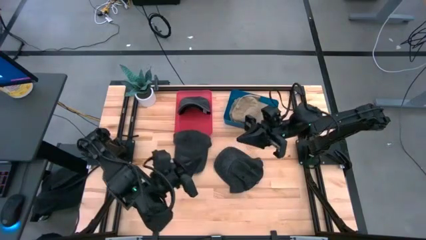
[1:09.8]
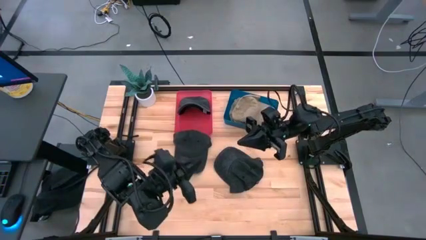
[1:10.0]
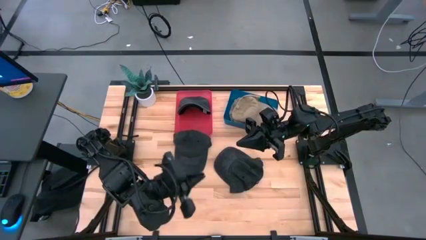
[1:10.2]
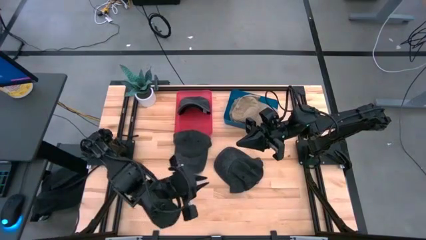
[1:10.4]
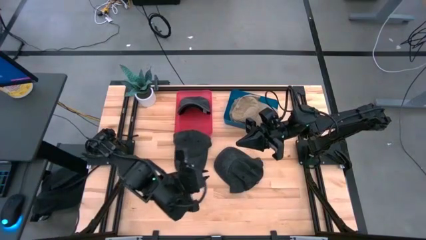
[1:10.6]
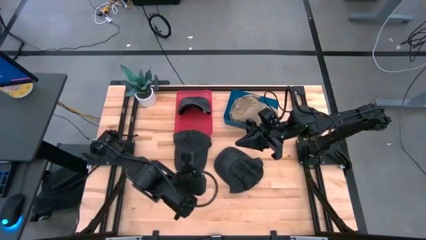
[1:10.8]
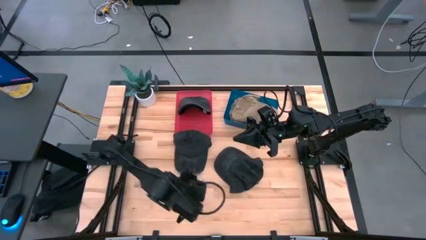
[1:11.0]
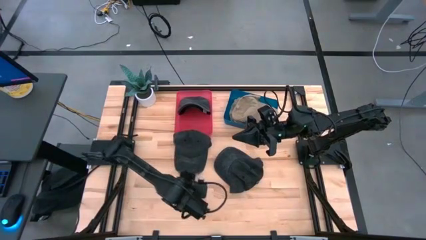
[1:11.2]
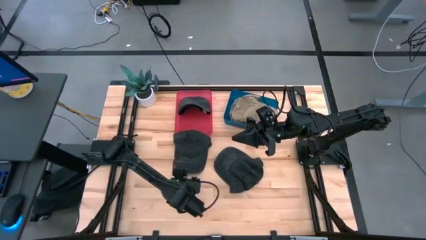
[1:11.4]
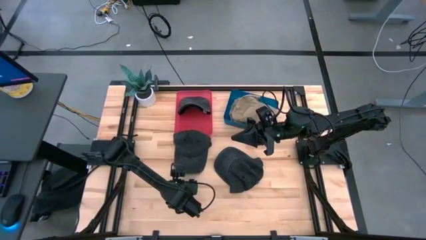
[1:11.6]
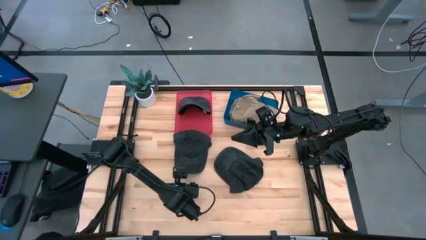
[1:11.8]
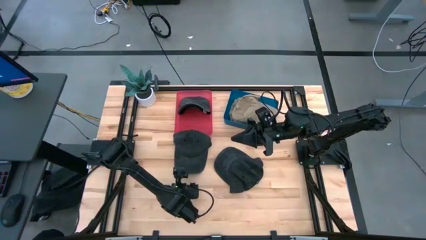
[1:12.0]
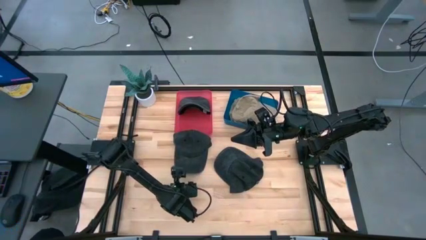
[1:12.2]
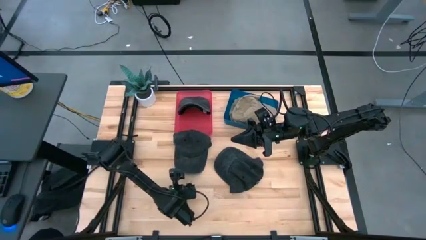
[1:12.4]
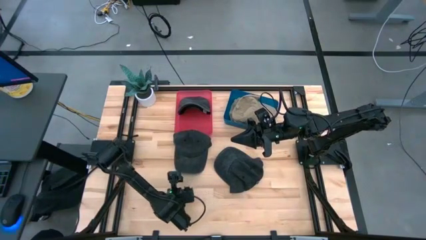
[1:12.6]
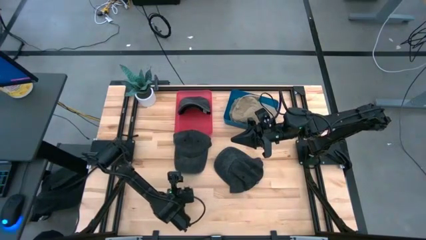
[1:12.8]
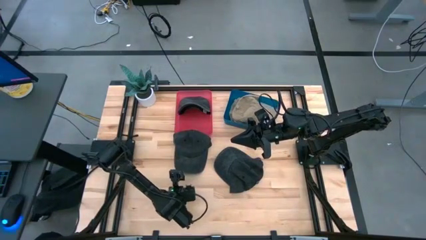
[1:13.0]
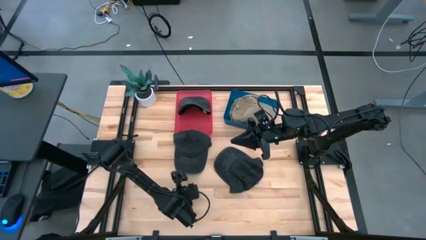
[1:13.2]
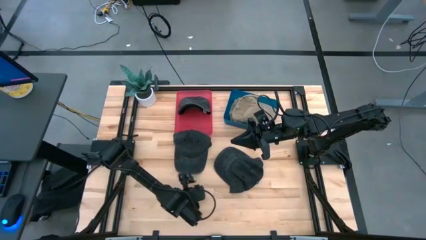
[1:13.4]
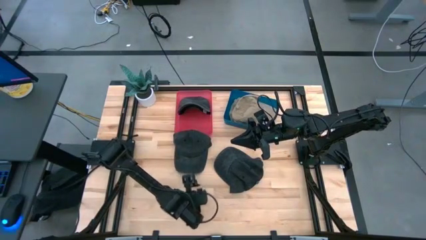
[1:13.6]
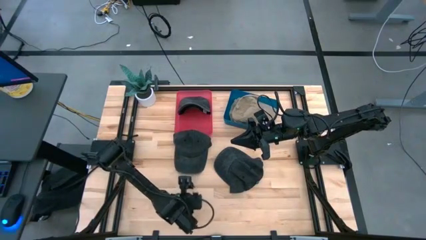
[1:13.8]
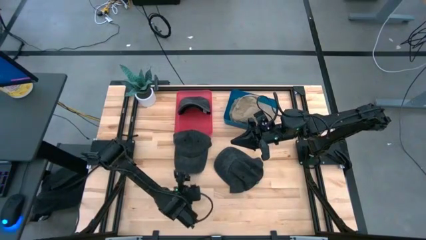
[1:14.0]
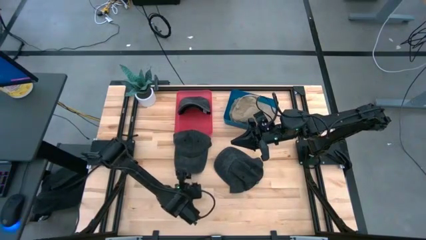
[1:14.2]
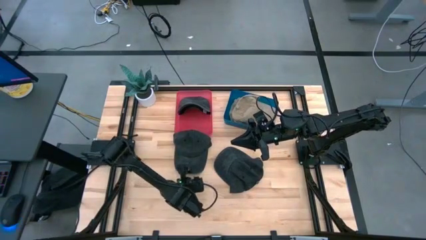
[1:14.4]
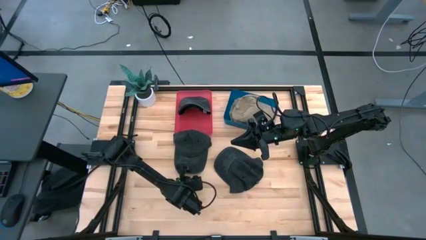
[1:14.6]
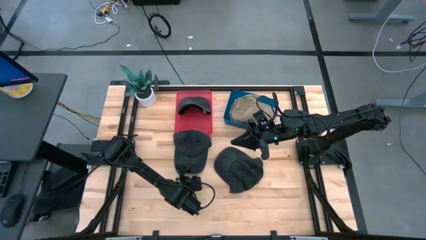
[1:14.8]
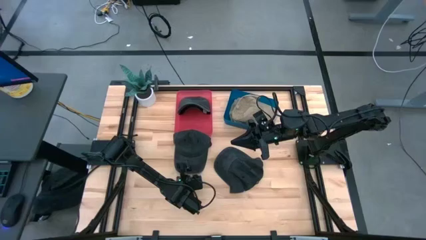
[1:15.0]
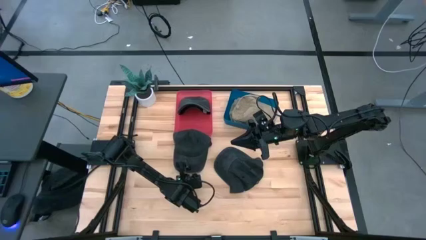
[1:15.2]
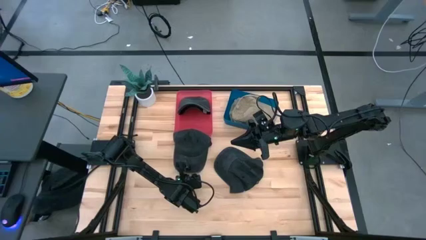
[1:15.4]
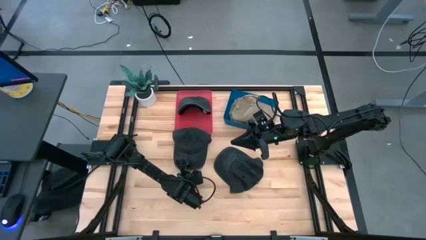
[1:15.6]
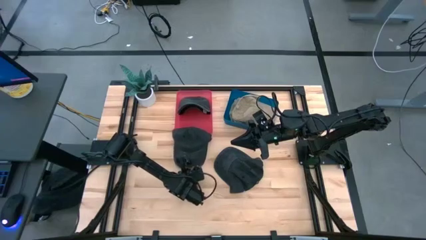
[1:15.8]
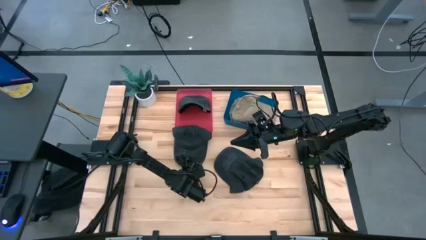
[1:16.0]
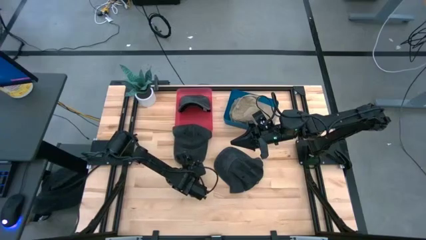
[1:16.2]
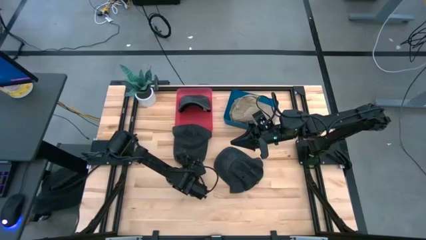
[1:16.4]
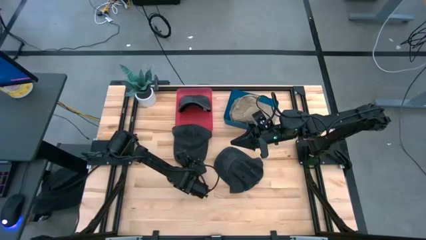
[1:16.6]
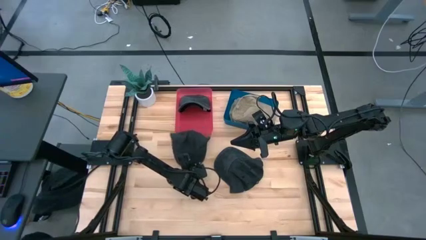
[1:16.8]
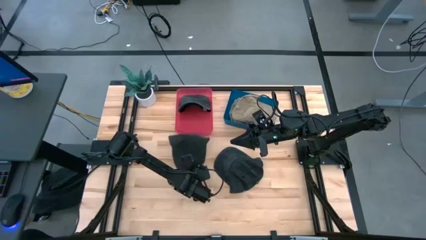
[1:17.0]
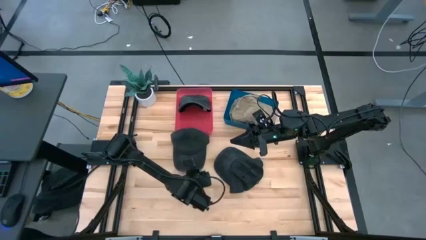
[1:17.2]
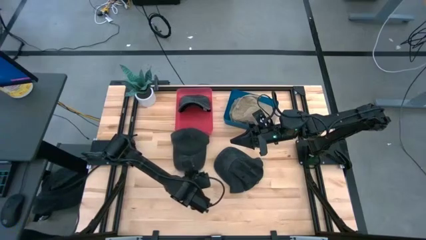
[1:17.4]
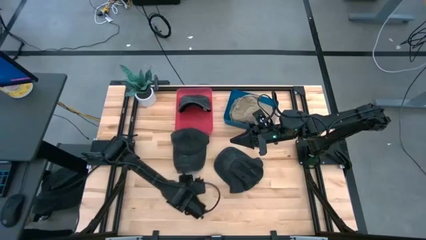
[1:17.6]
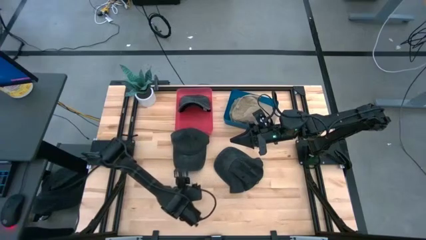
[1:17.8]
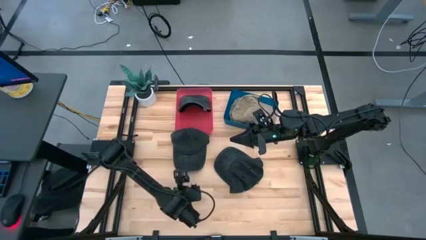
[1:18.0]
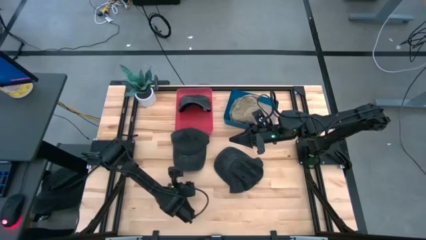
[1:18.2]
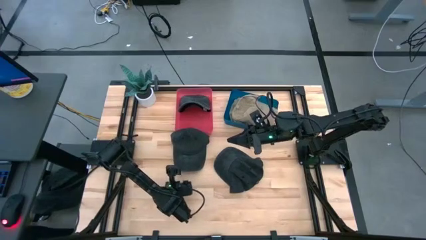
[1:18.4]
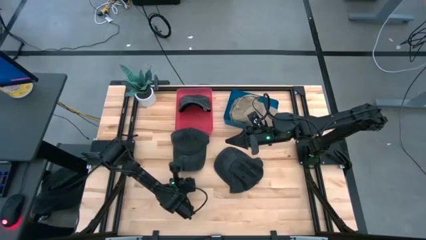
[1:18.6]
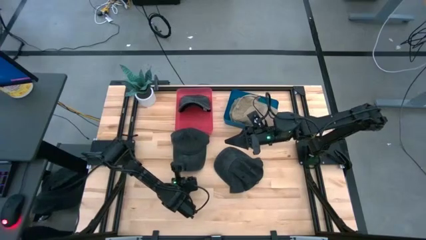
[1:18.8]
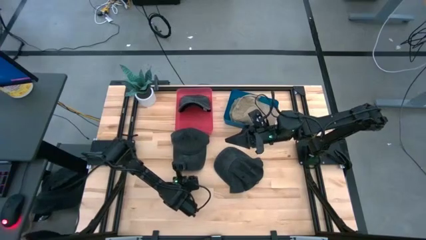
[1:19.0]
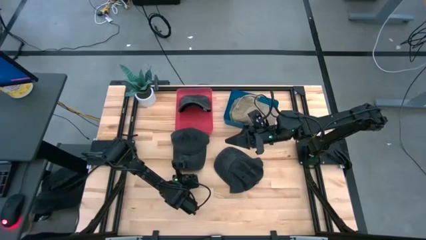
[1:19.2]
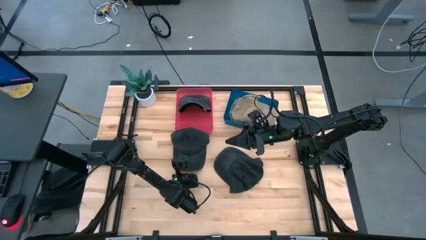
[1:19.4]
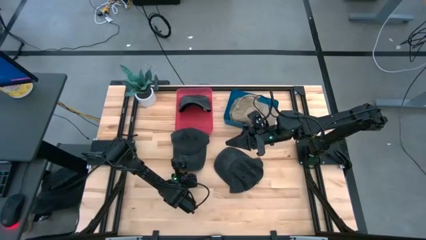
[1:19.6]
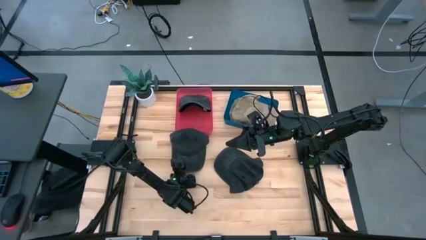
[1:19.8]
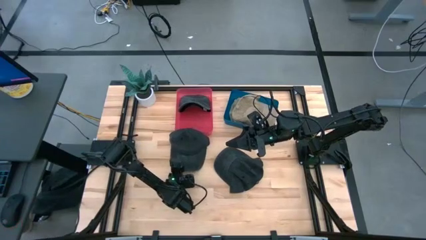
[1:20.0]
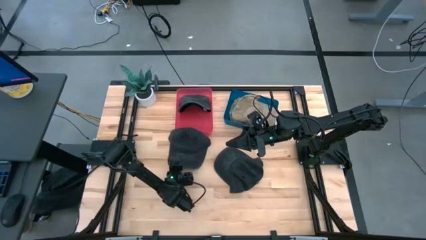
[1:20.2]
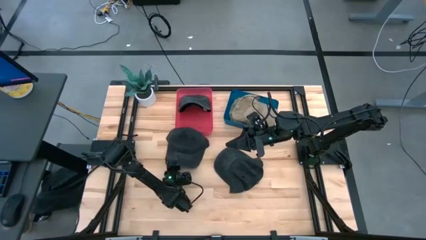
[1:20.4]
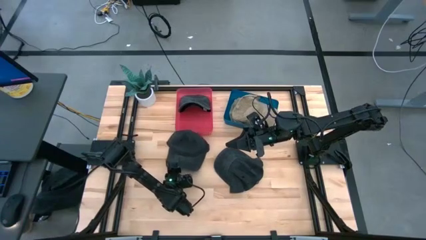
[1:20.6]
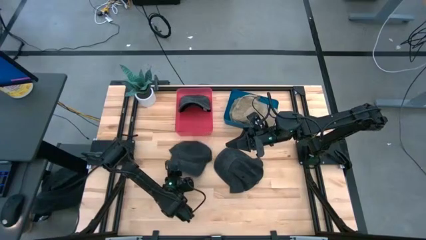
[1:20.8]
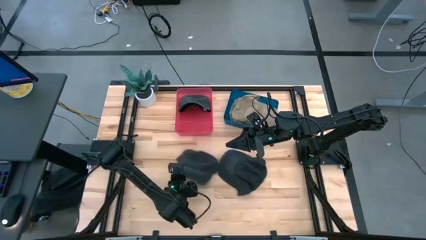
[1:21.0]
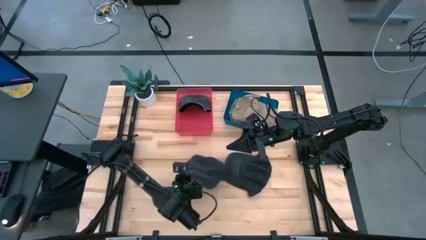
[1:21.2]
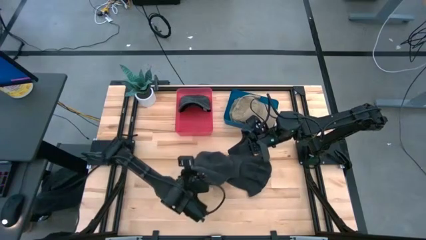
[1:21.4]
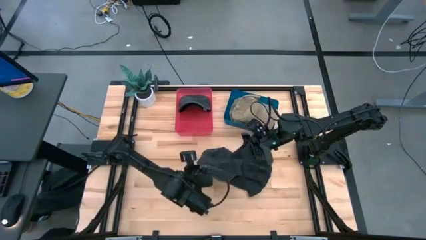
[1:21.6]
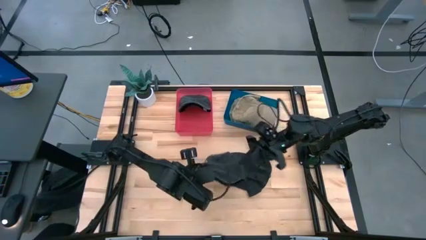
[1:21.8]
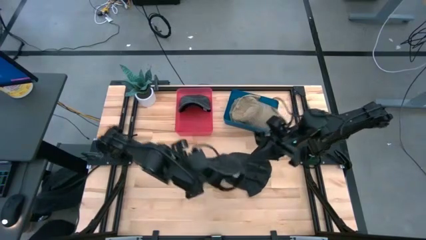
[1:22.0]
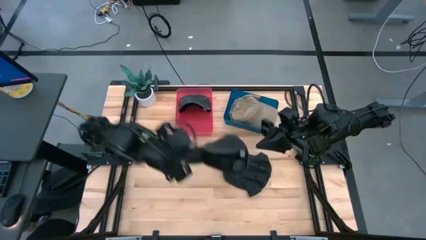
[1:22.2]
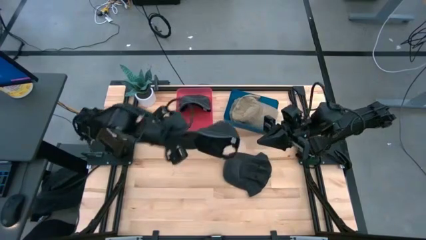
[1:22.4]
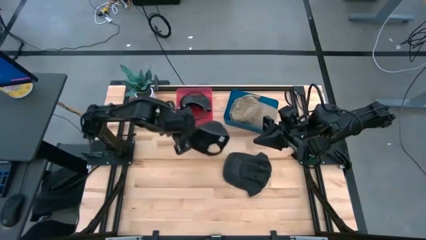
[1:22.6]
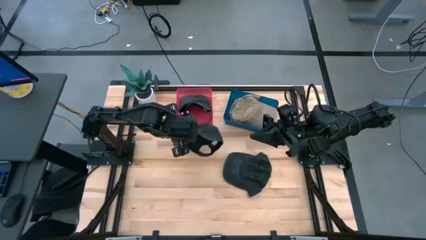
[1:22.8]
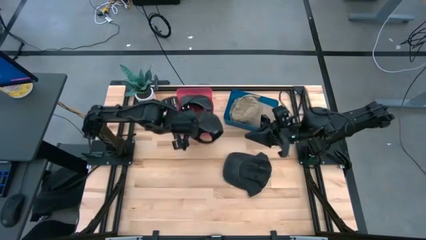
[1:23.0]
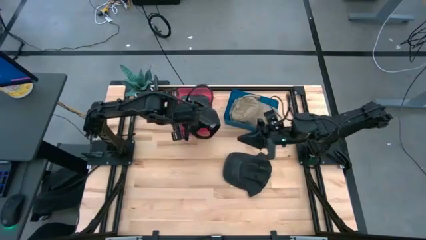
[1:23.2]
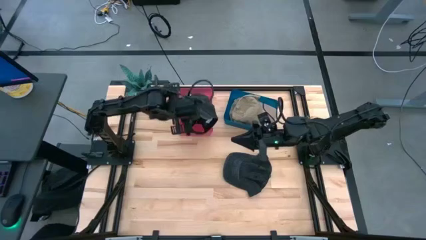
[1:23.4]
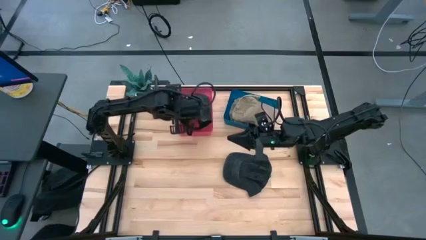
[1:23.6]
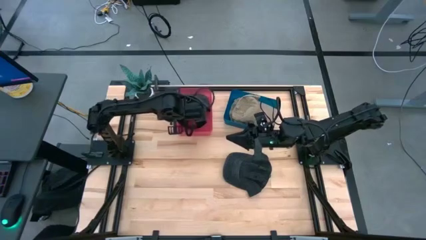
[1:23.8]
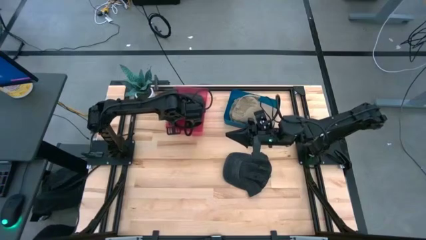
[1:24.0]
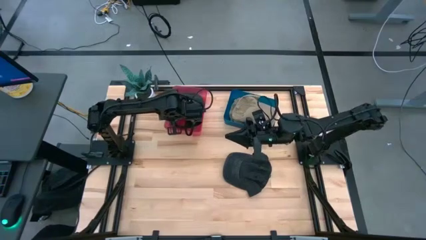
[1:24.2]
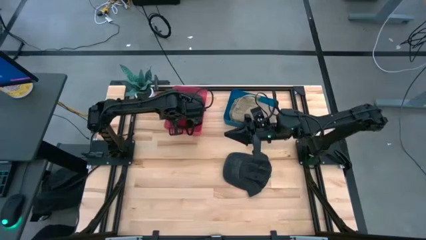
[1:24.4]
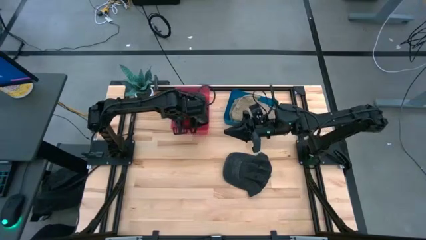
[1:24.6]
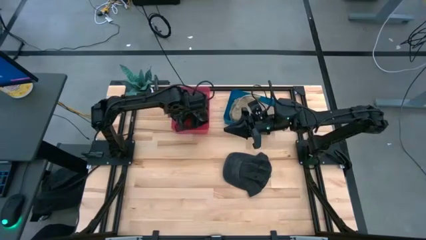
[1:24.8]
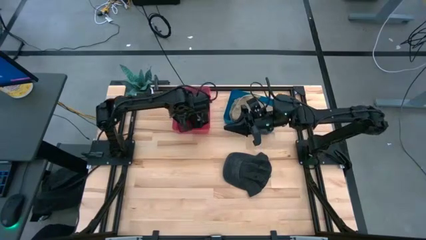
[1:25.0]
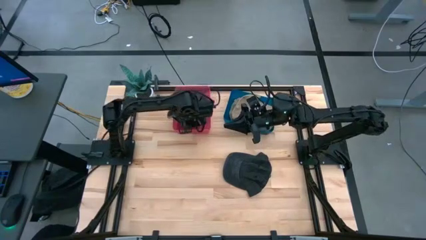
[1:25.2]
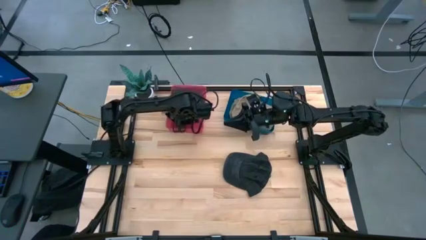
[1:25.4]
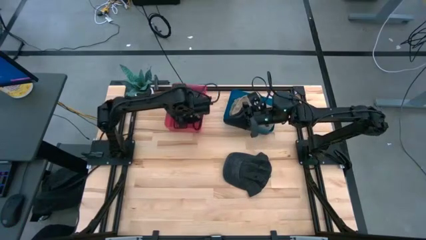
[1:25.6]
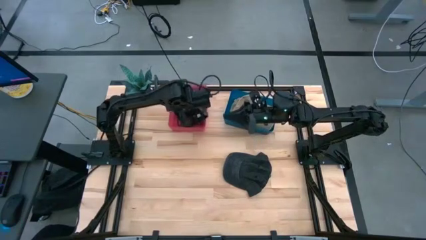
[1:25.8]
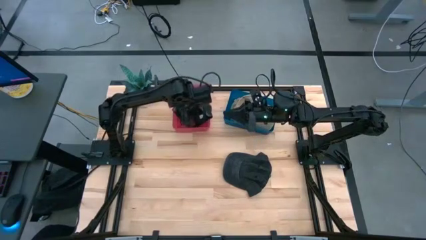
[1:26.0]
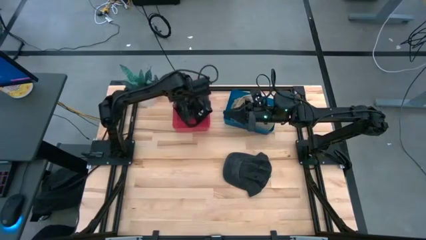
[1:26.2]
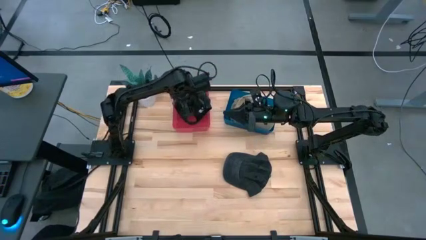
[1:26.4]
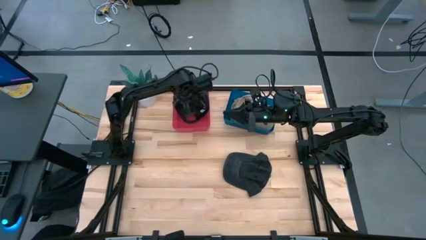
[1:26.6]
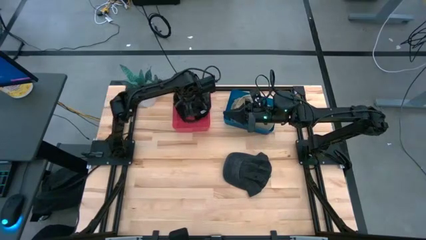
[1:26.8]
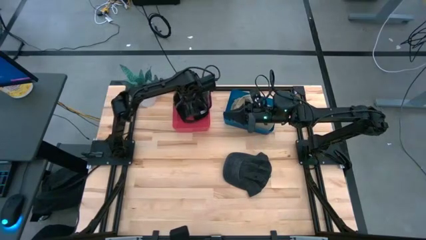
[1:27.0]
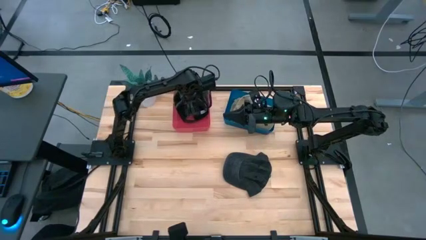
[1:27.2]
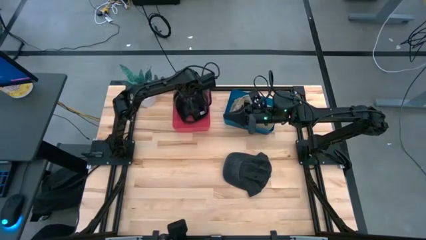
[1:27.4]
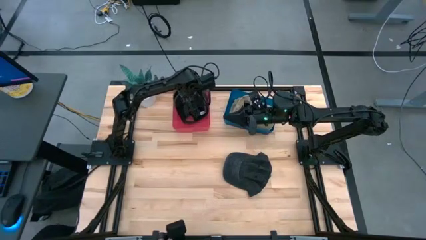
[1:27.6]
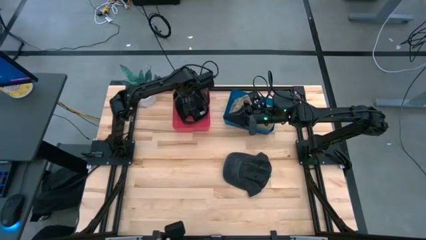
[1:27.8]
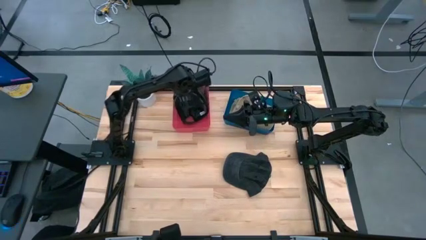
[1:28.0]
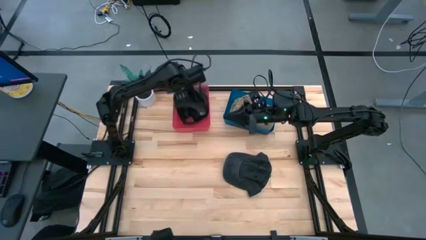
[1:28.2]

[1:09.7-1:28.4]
Task: Pick & Place hat
Put the left black cap into the blue bin
